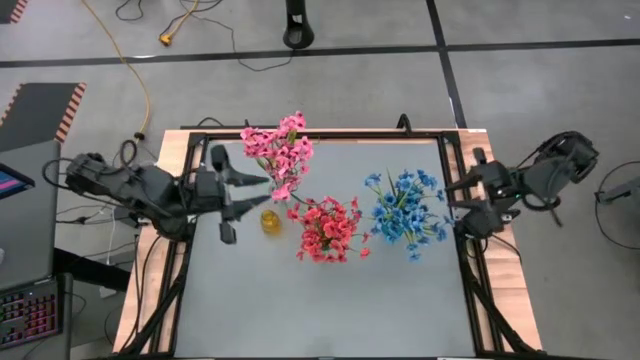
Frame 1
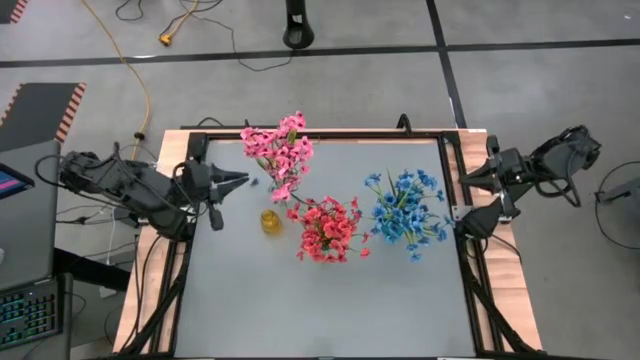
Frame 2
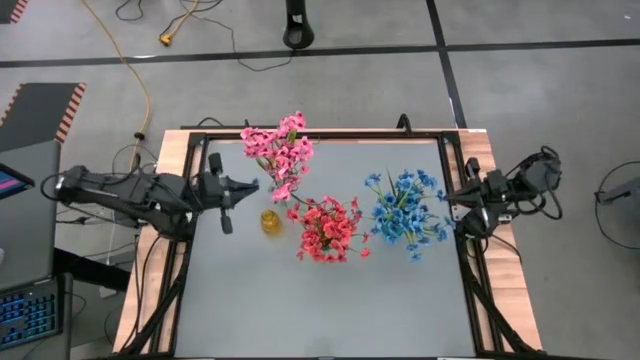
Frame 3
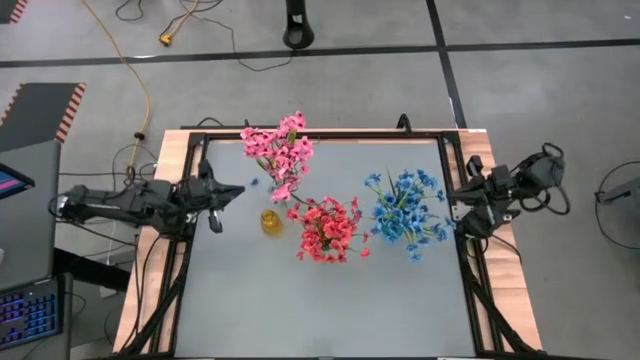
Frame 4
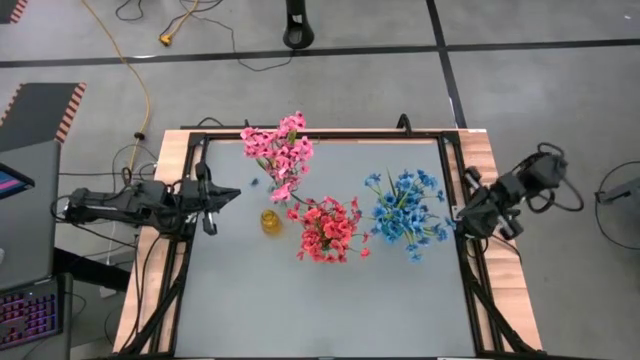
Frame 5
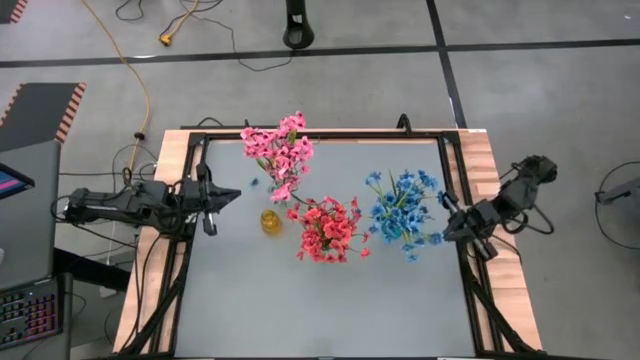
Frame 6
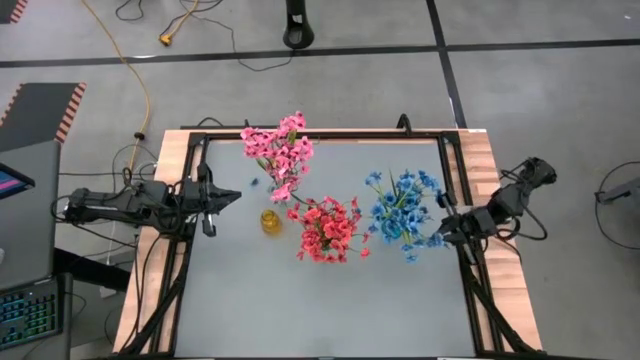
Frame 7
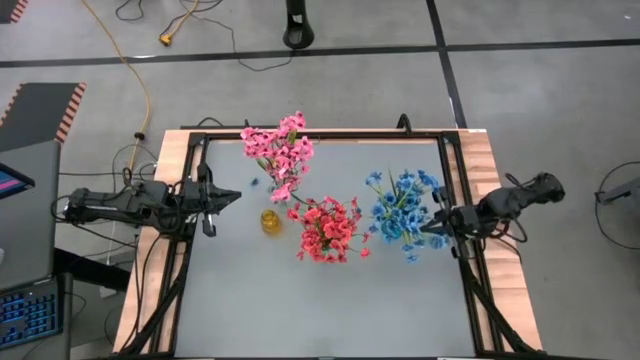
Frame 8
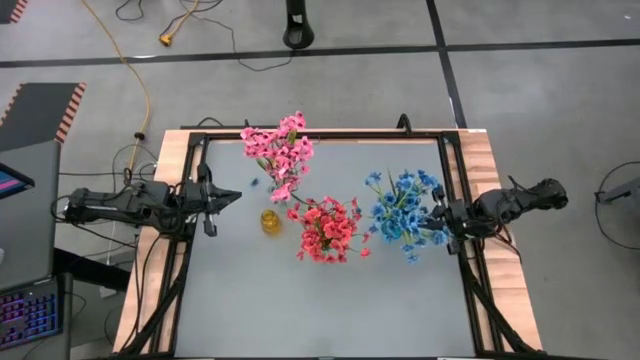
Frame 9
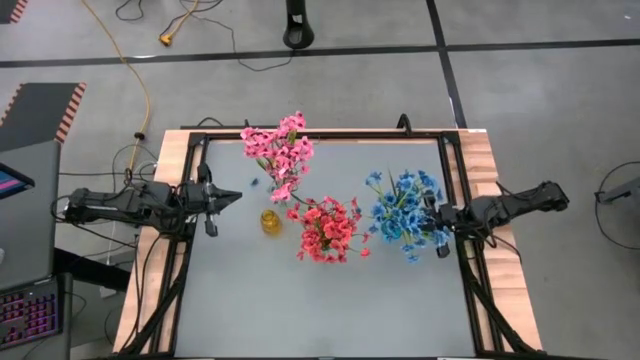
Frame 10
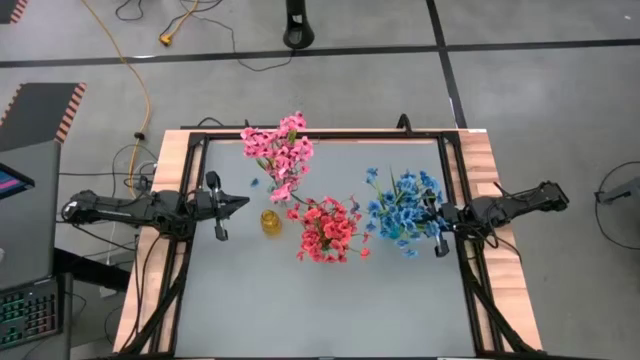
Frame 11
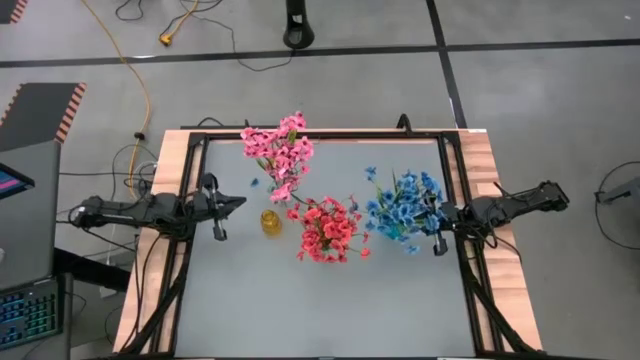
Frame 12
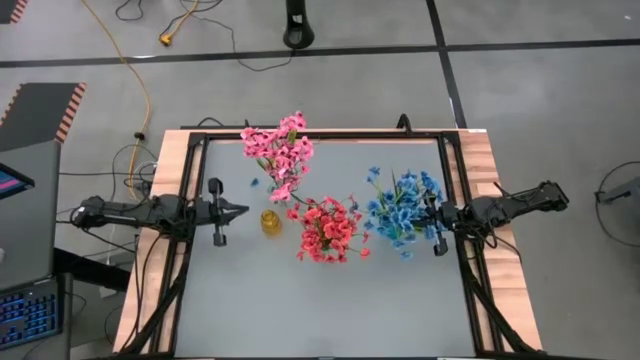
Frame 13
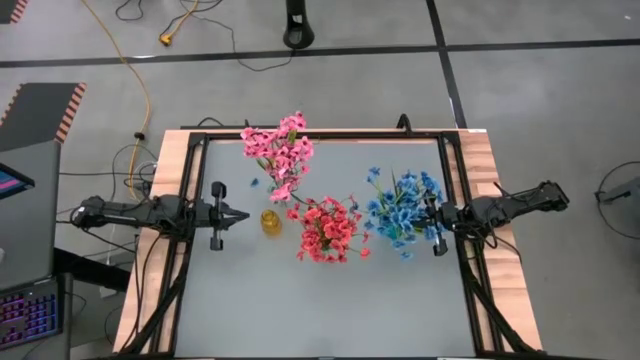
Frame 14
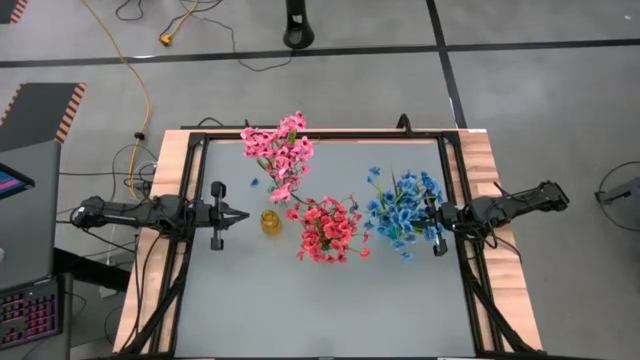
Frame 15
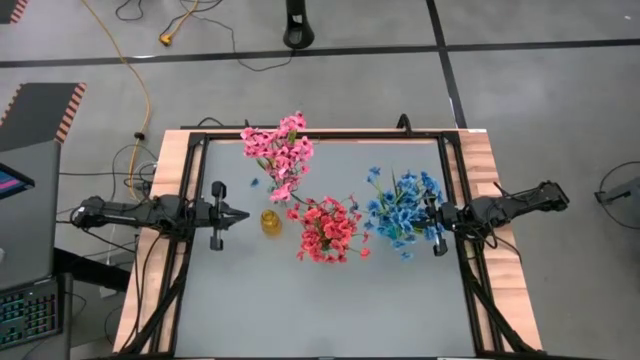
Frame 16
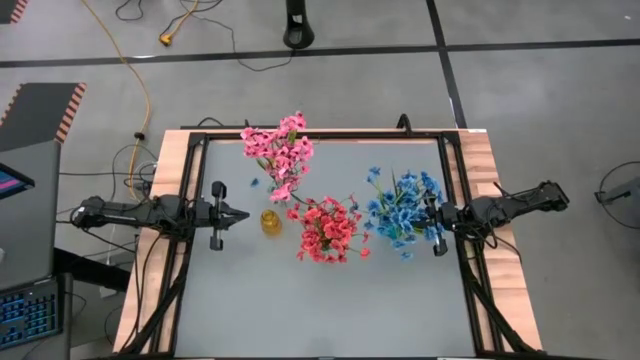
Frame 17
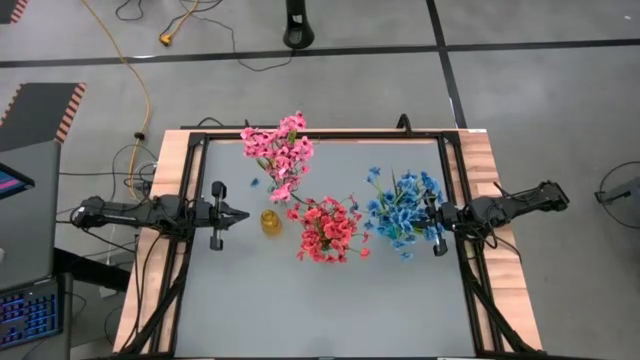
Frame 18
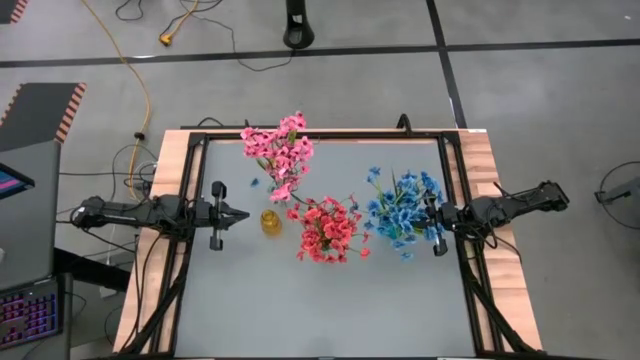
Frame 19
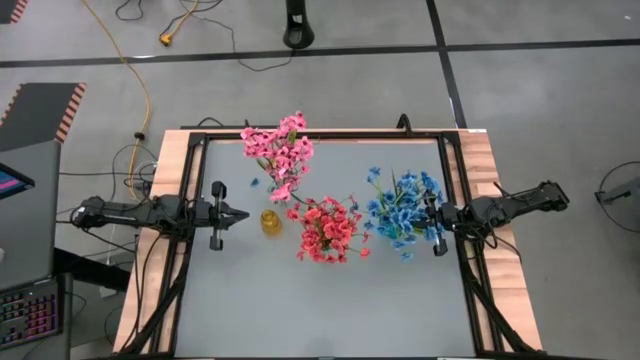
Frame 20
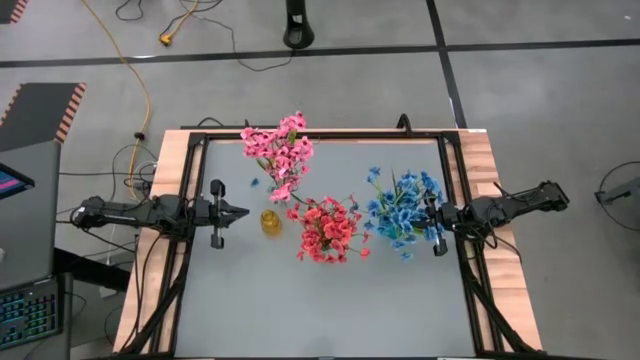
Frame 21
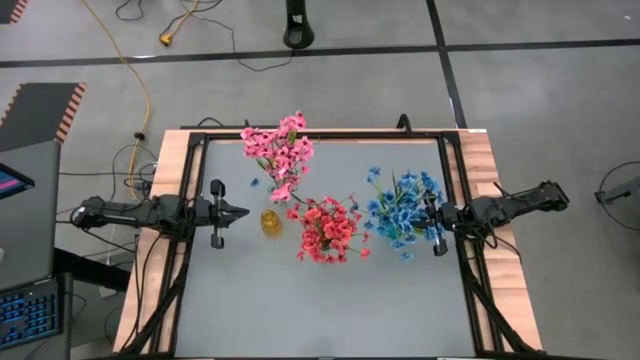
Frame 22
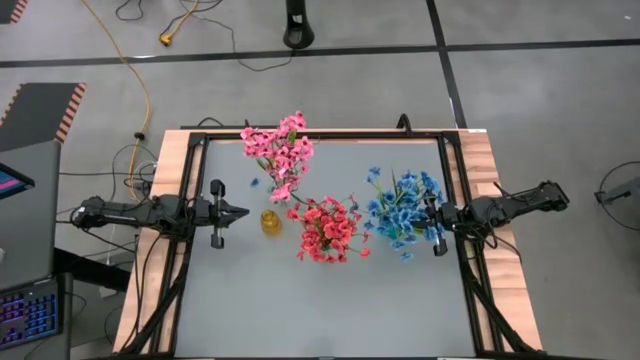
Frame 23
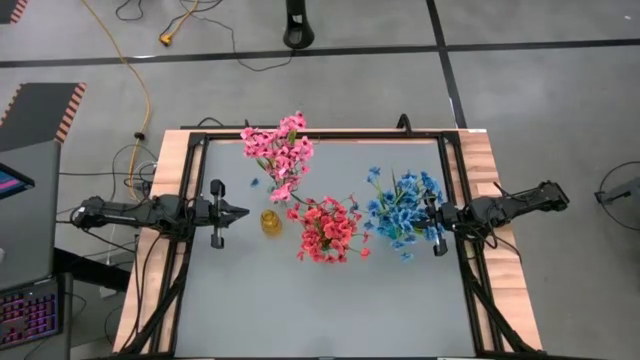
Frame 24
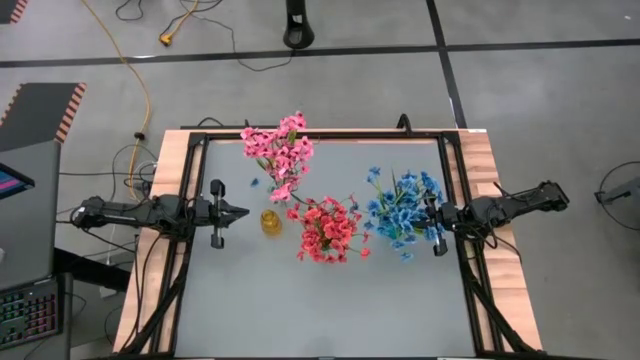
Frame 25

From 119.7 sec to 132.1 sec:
Task: Sort flowers into vase by color
Return to Home Position

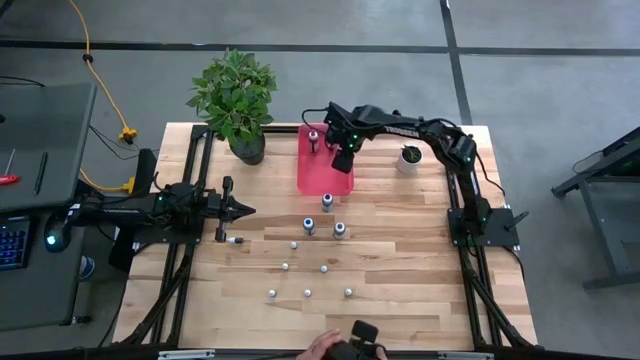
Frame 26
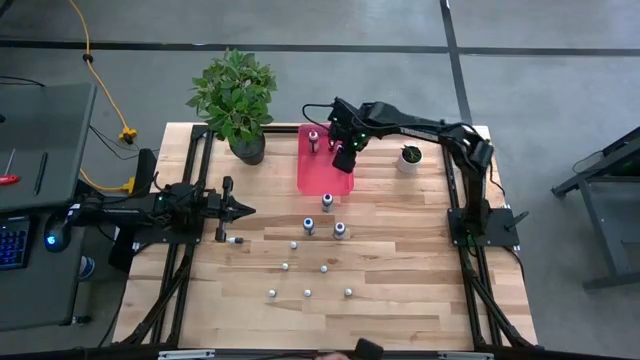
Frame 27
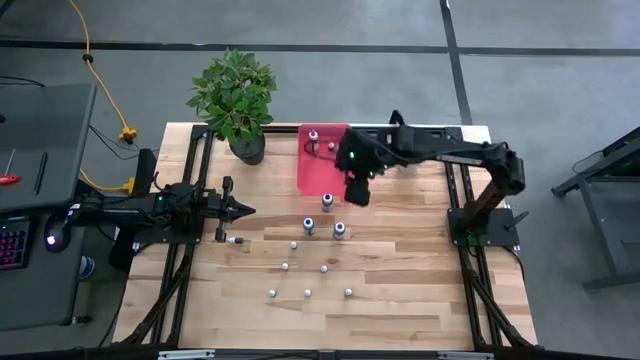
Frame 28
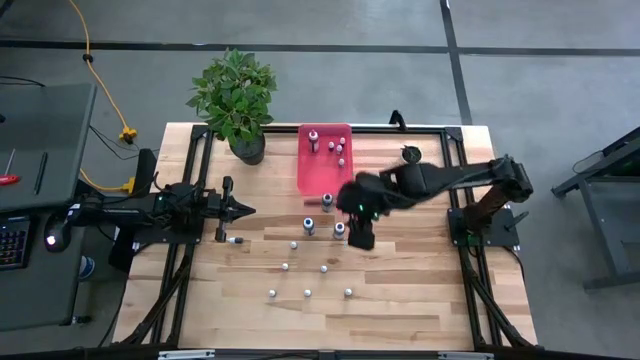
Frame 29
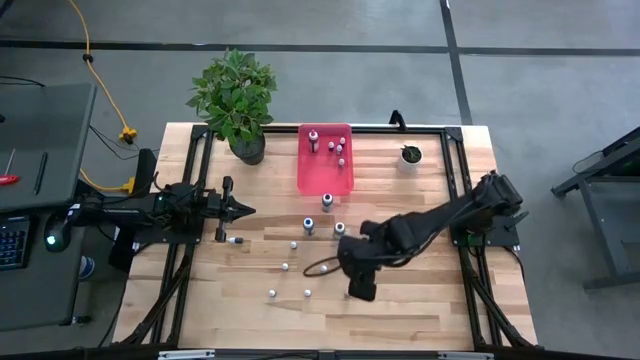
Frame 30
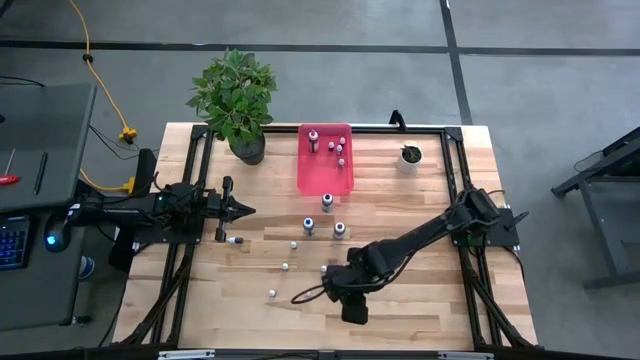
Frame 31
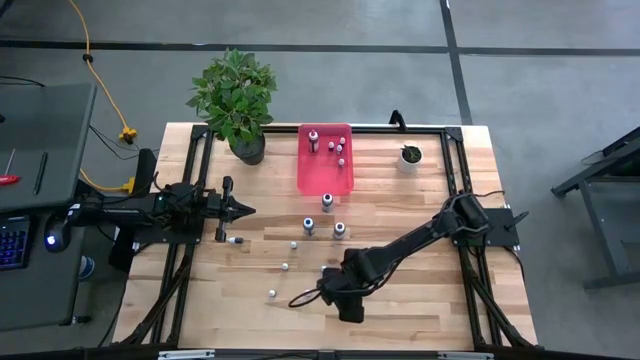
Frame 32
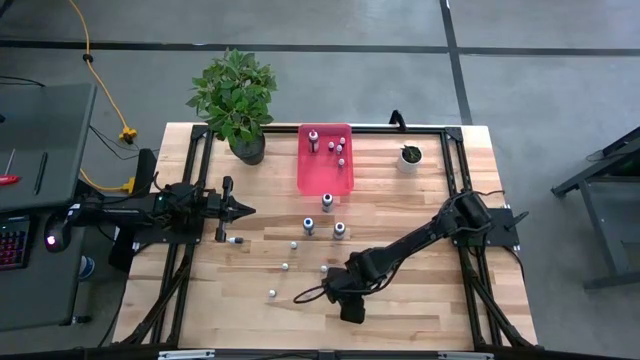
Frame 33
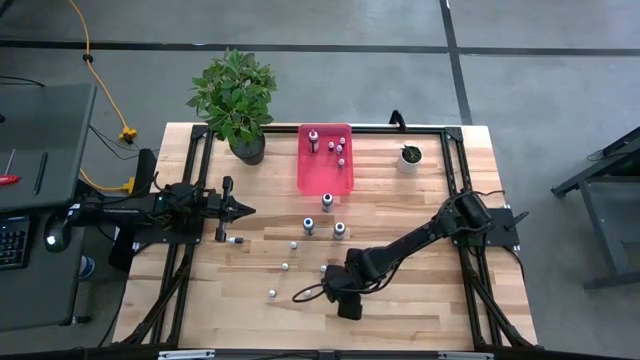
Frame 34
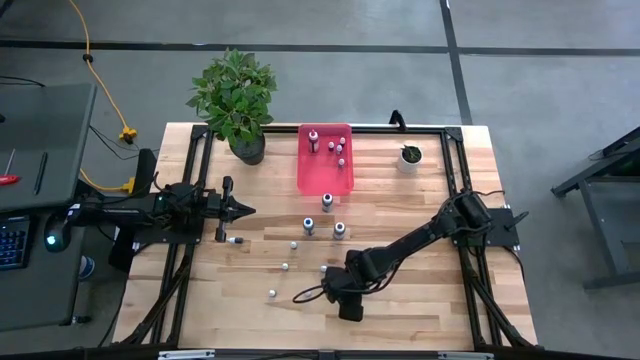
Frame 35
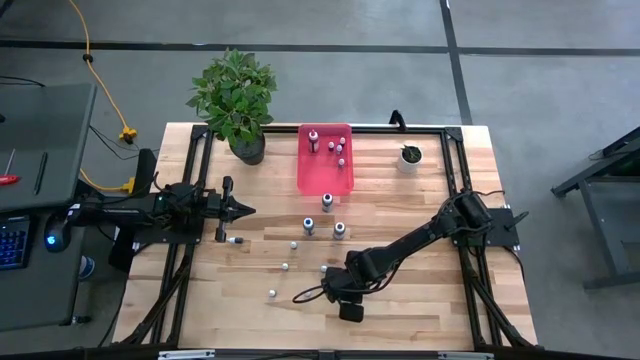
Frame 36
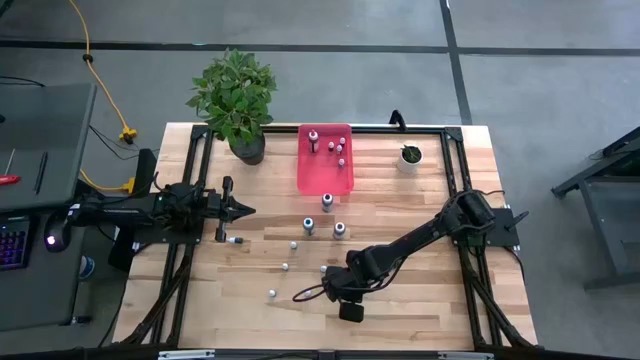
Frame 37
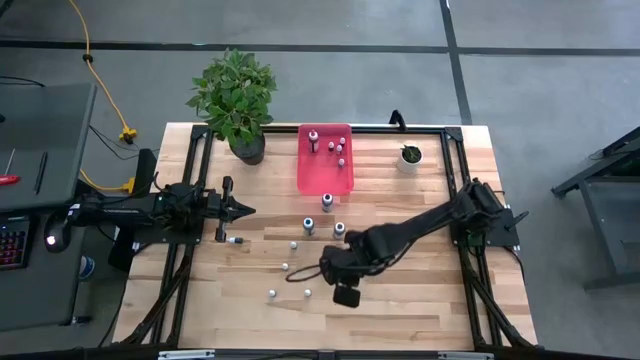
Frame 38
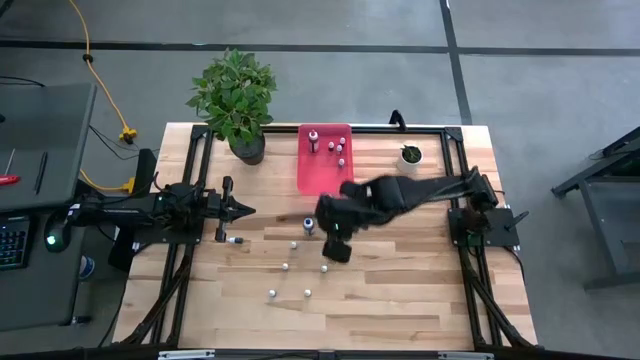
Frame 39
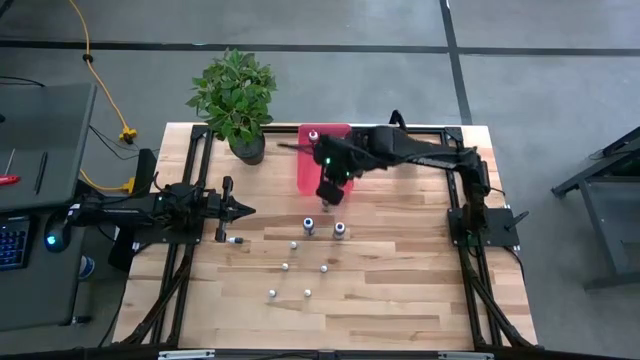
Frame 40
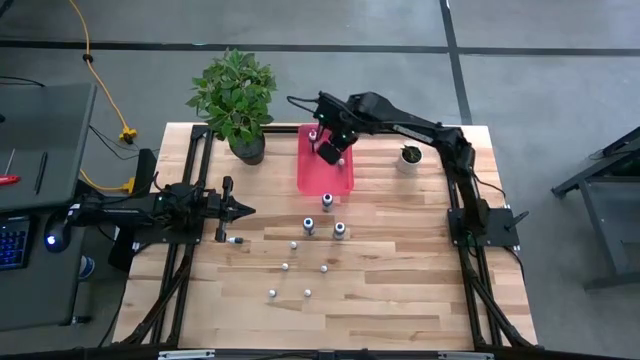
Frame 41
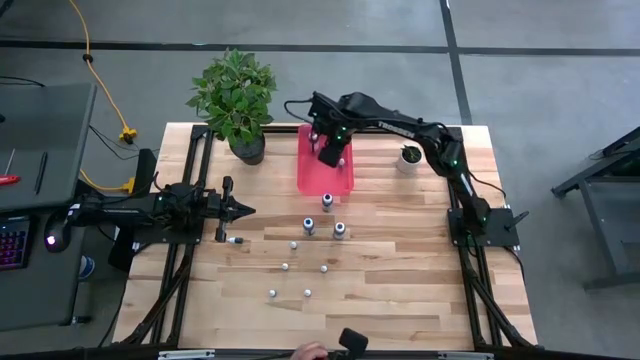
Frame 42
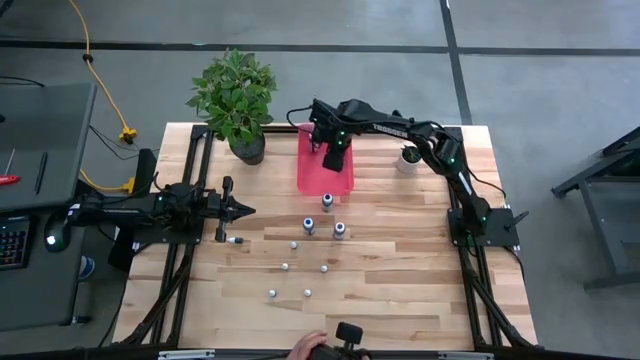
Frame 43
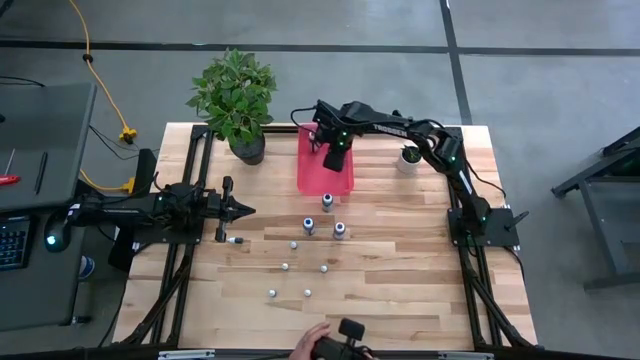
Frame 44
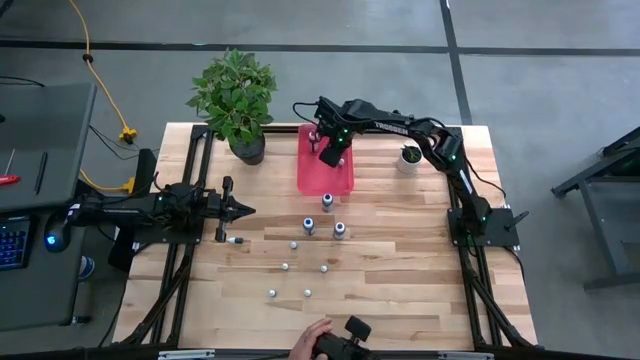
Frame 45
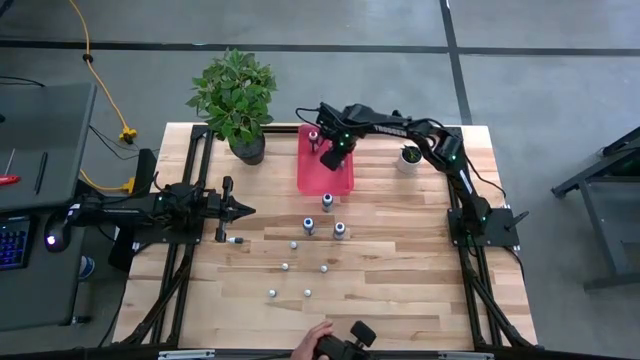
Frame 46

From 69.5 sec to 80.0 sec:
Task: Pick & Place food coloring
Put the green food coloring bottle into the pink bin
